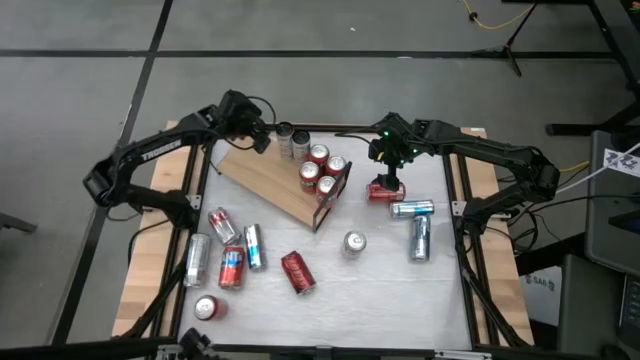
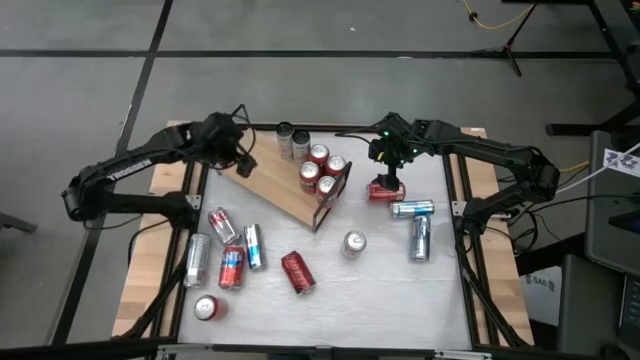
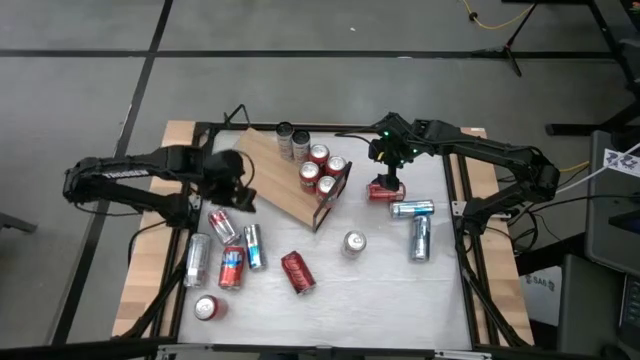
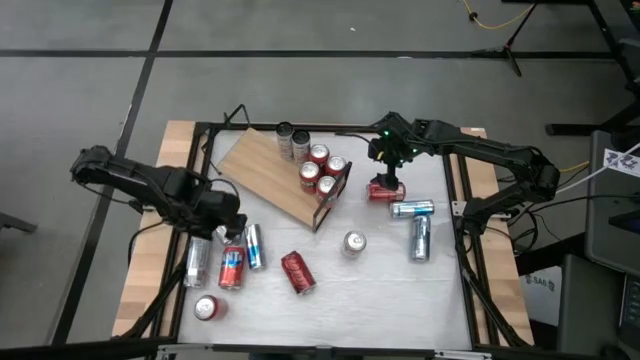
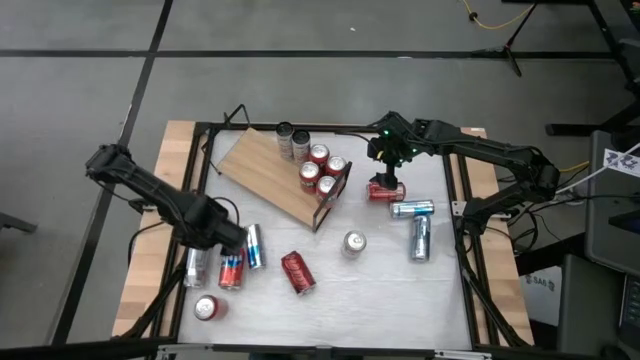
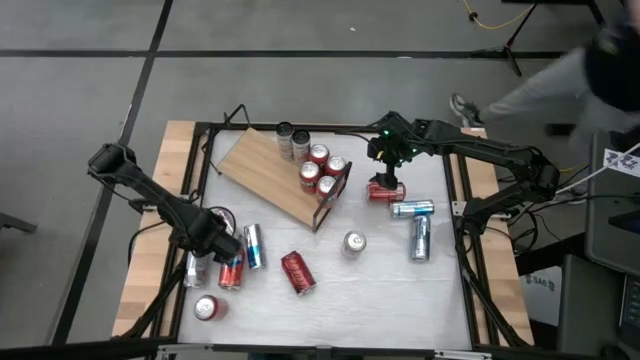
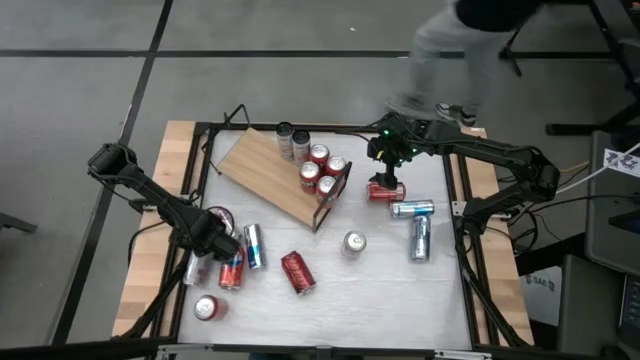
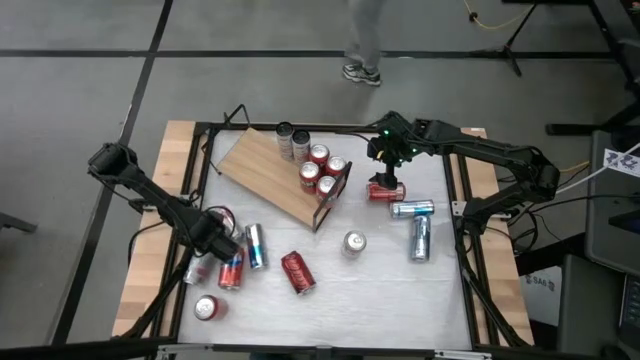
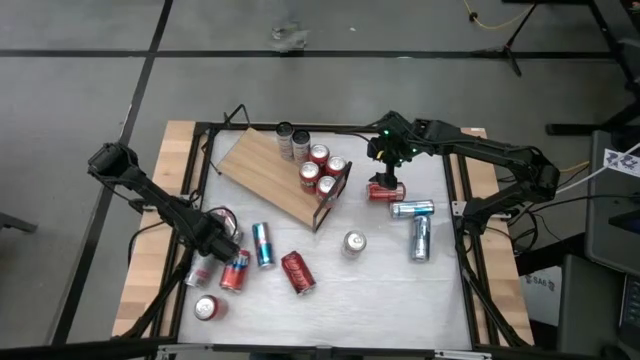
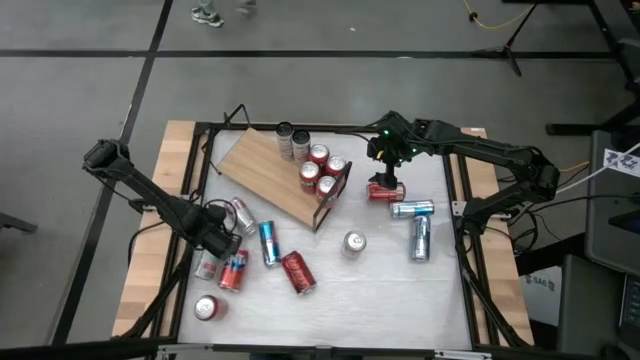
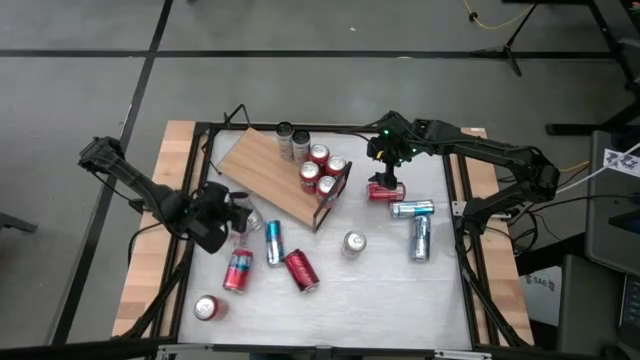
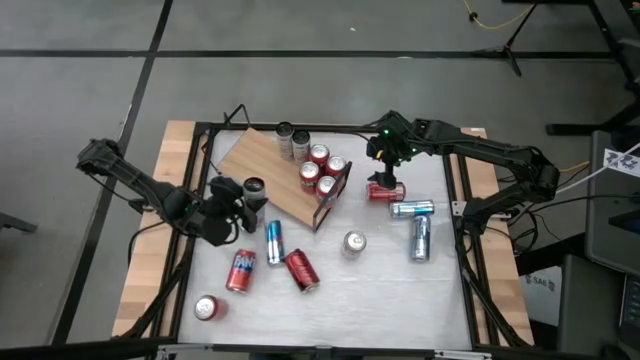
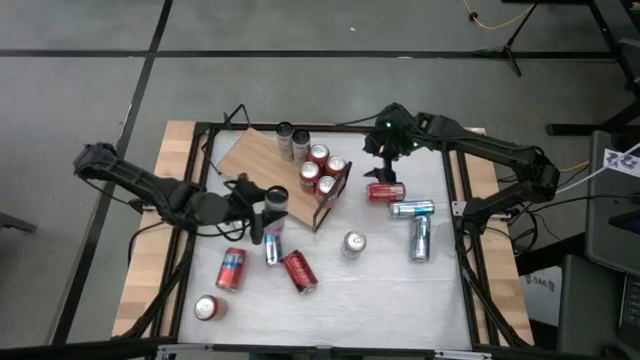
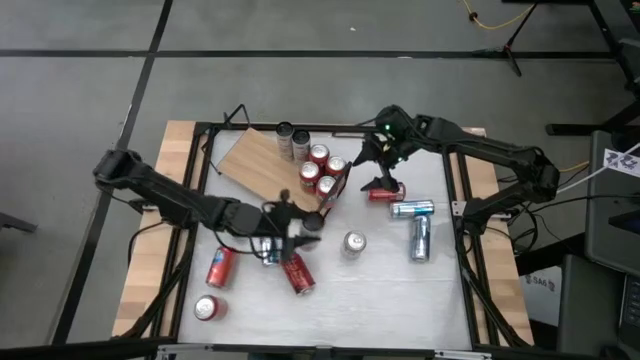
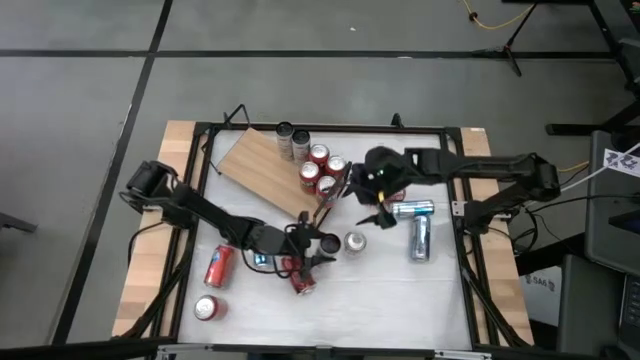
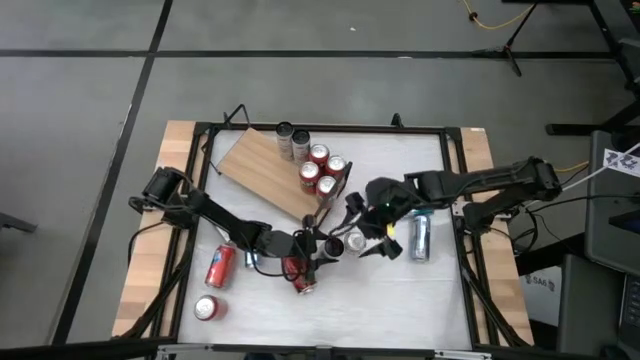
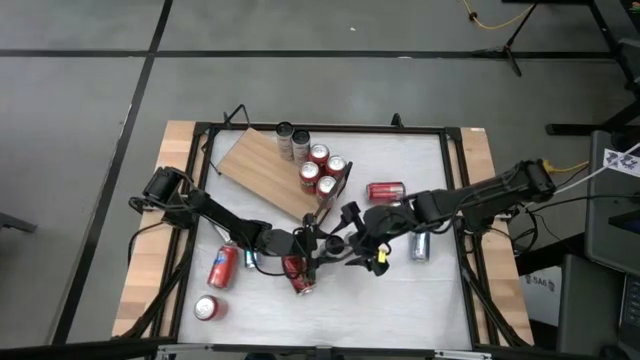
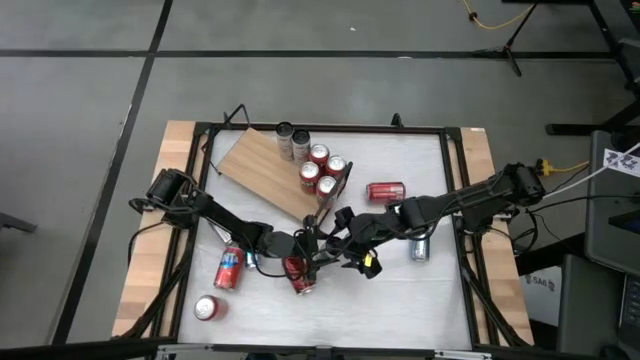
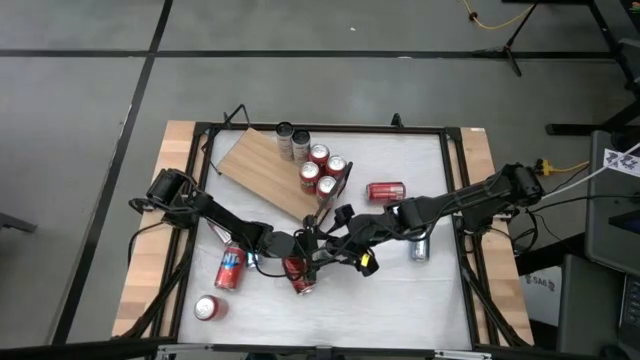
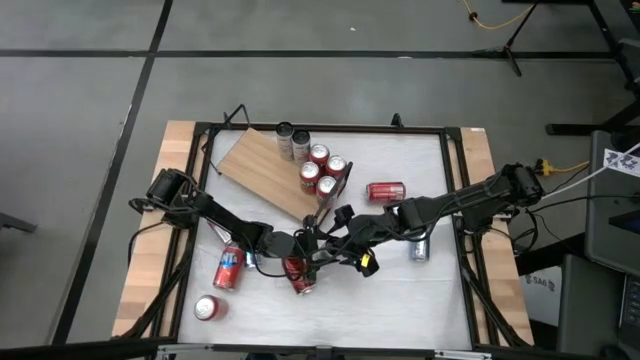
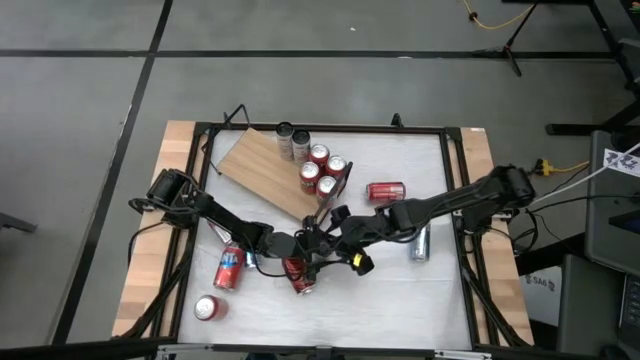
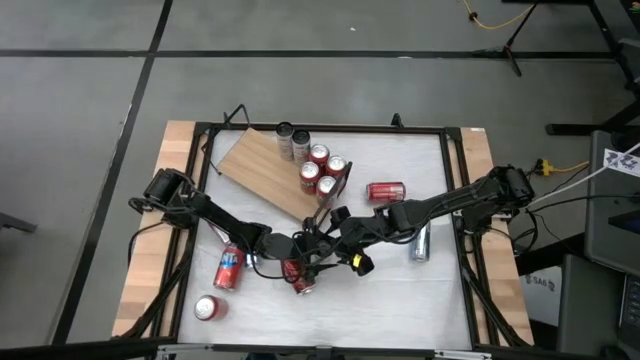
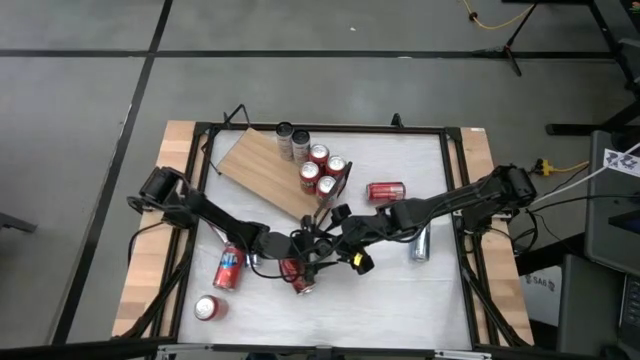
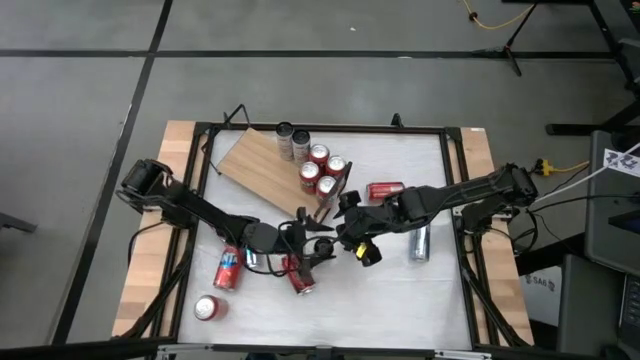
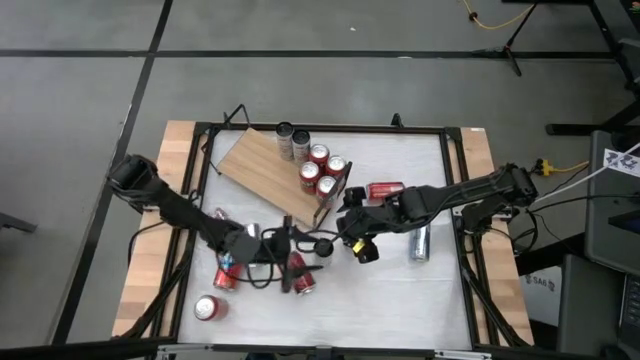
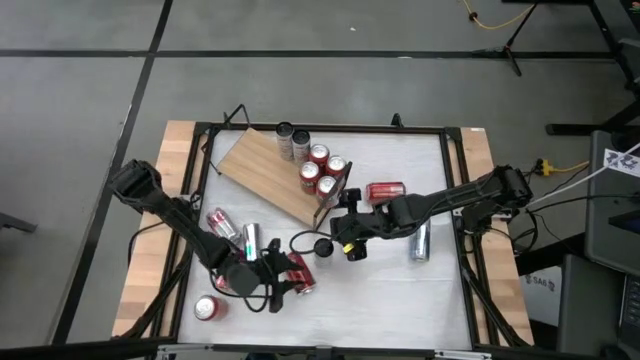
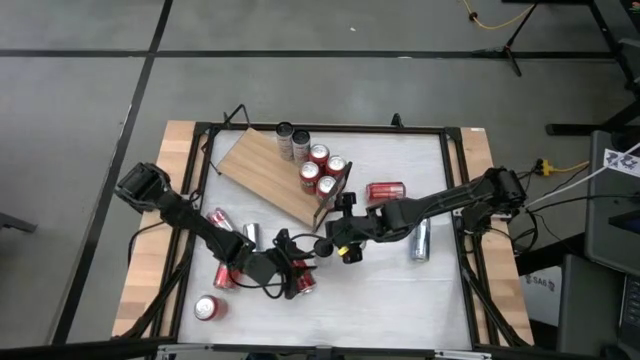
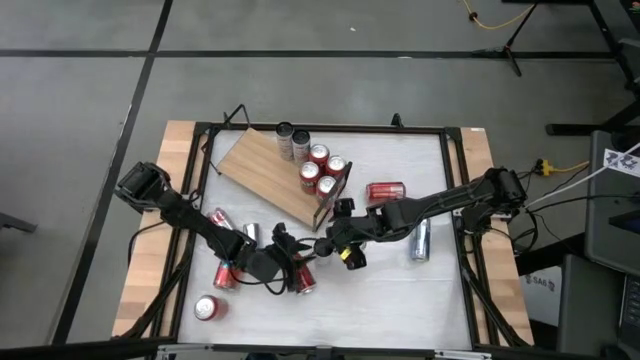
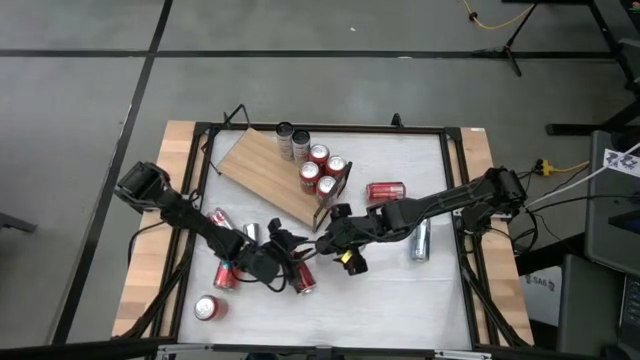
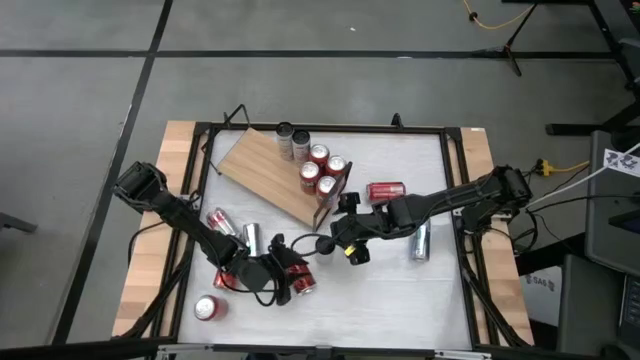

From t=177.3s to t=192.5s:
Task: Pick and place cans onto a shelf
Put the pink and white soda can on the shelf aligned with the other right pink and white soda can

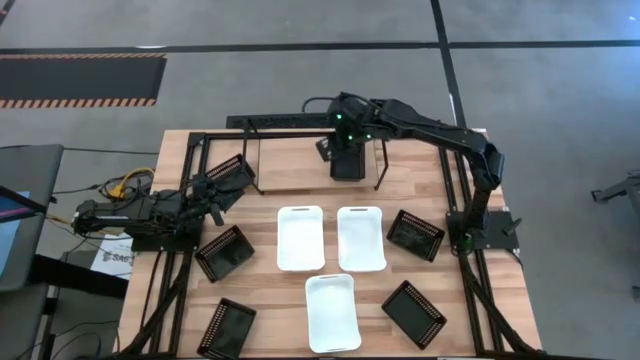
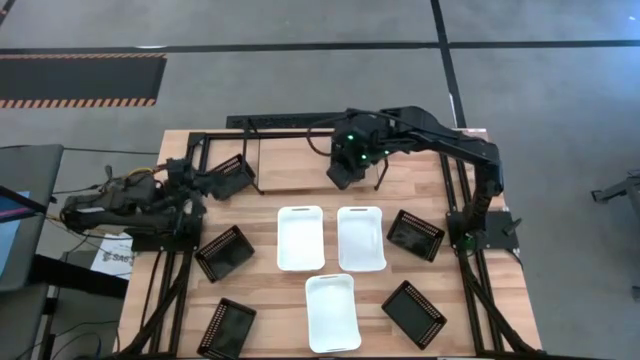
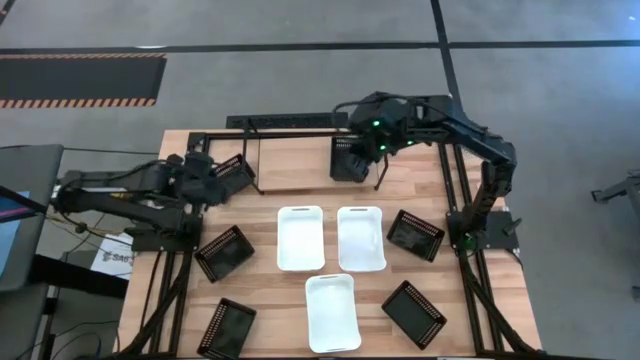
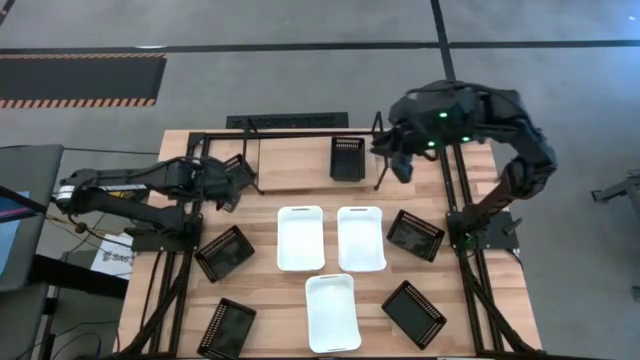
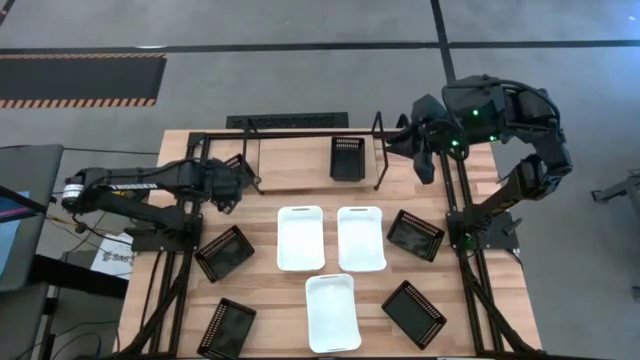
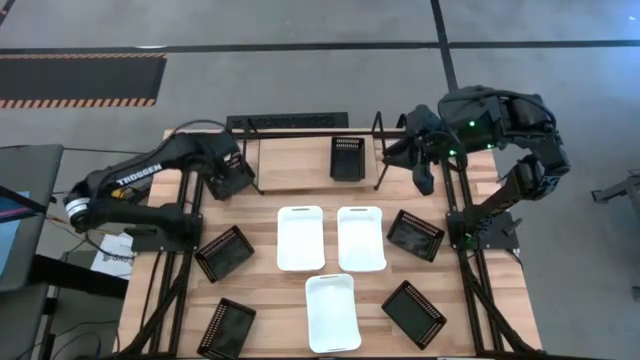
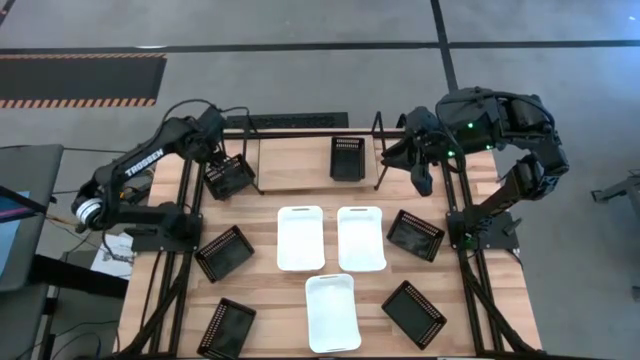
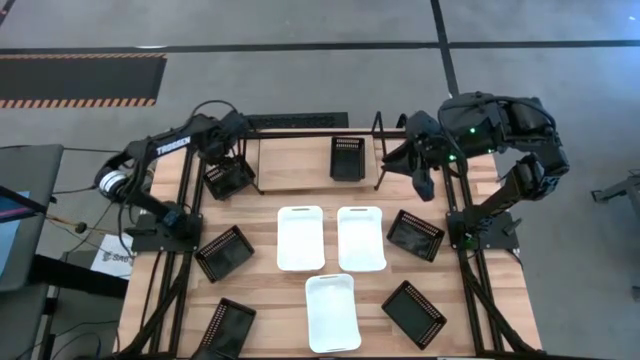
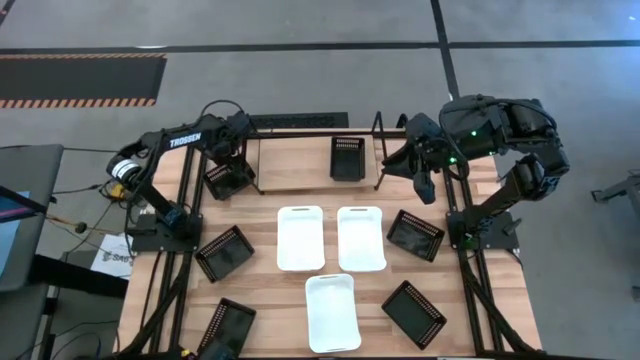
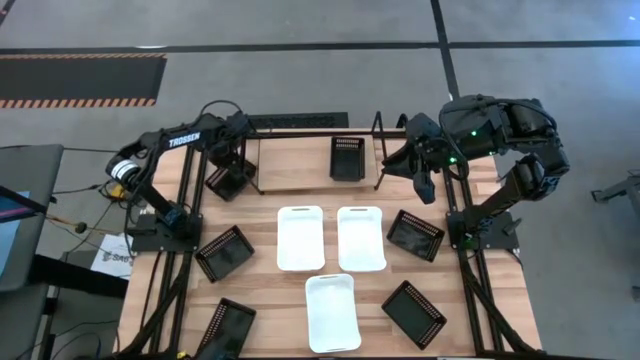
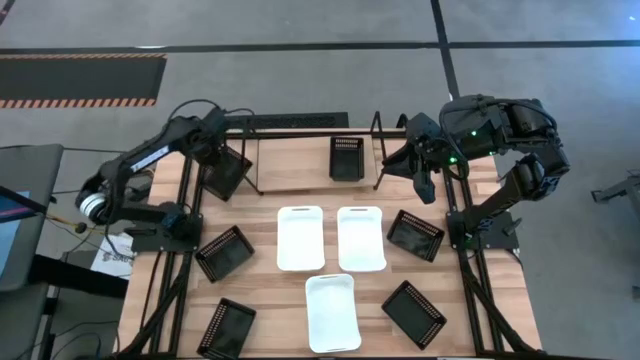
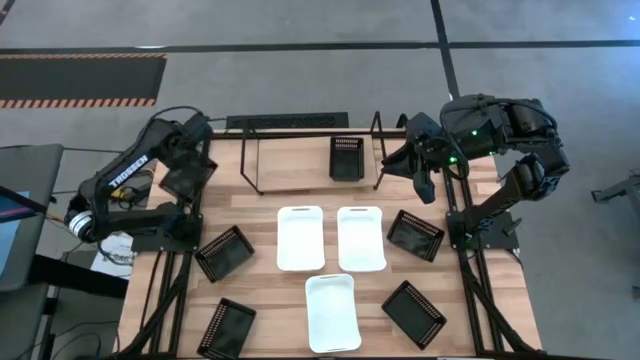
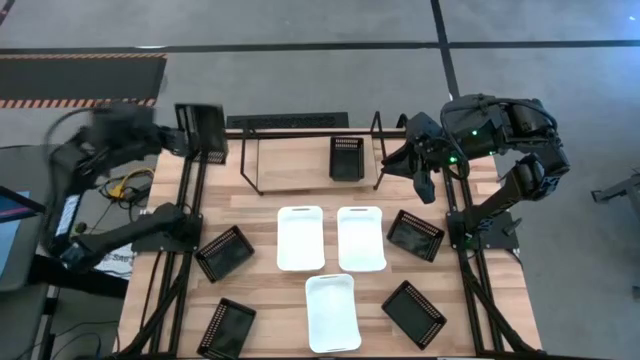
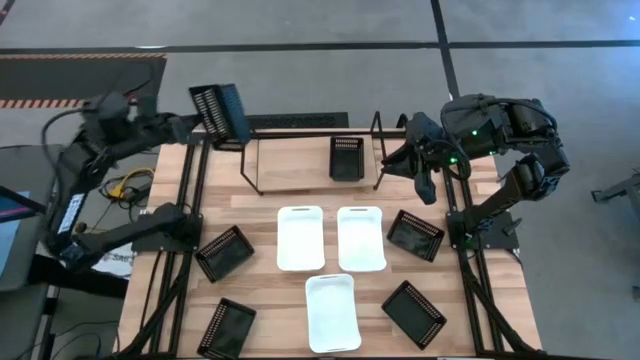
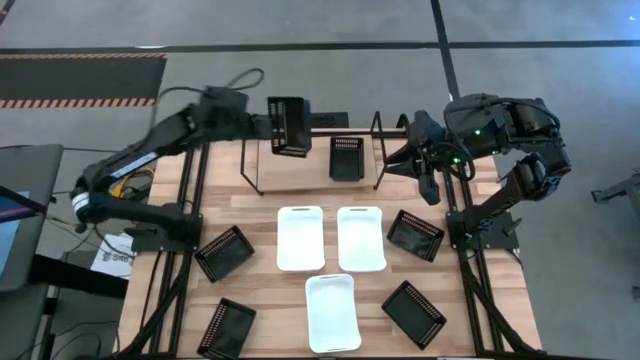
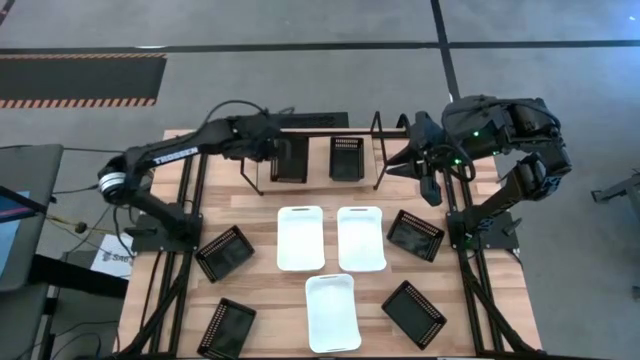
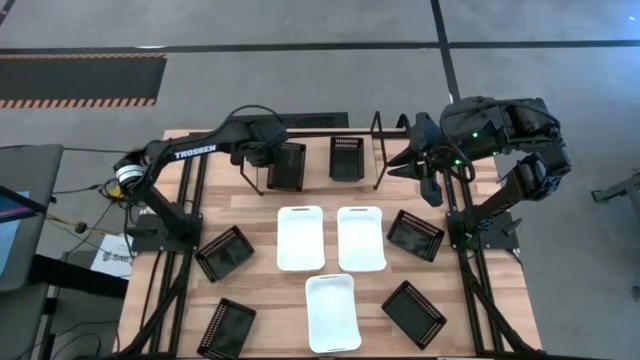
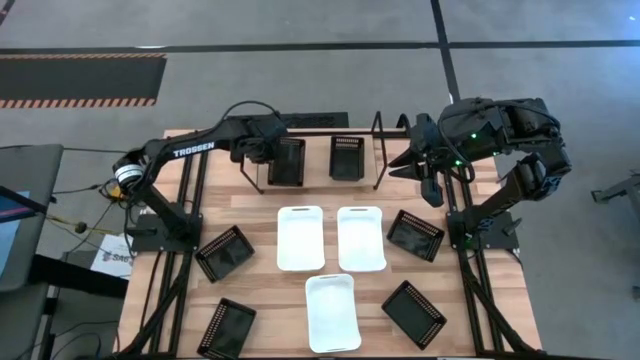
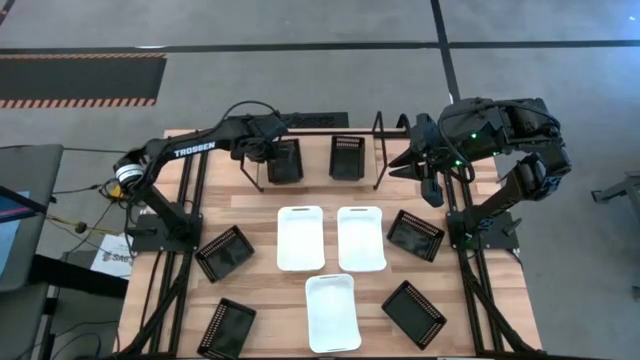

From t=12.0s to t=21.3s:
Task: Stack baskets on shelf by color
Put the black bin on the shelf
